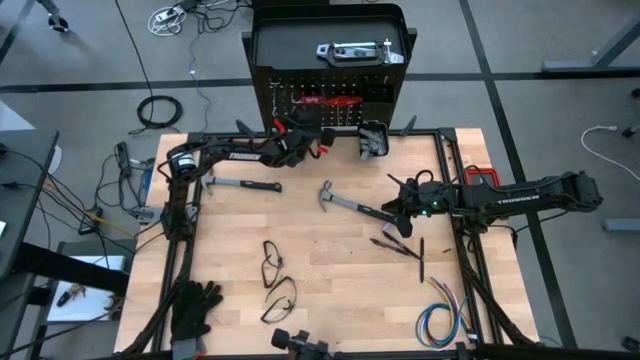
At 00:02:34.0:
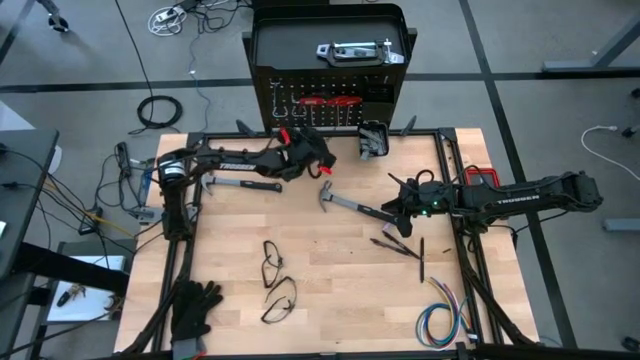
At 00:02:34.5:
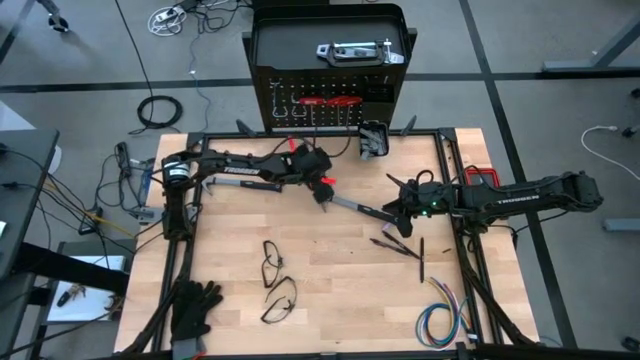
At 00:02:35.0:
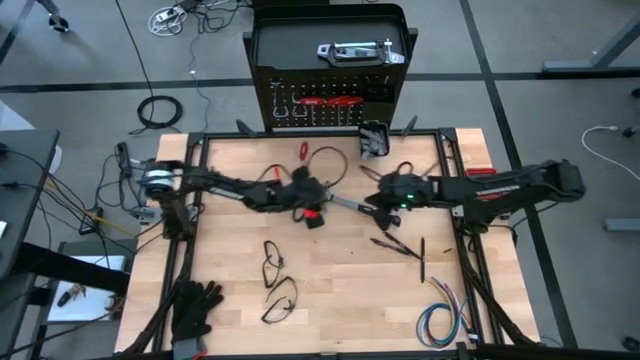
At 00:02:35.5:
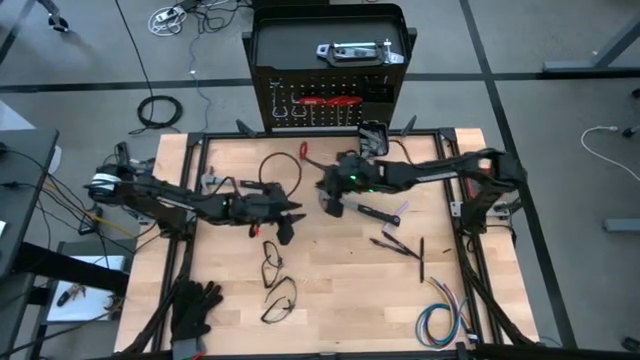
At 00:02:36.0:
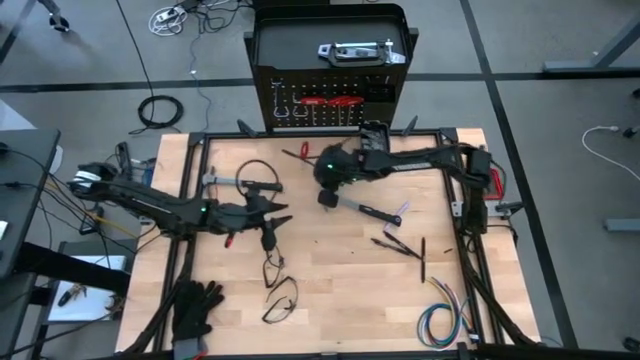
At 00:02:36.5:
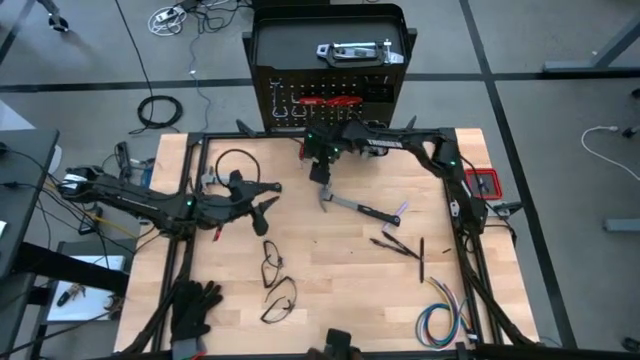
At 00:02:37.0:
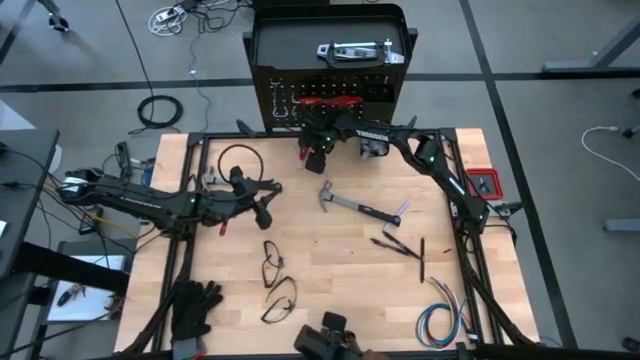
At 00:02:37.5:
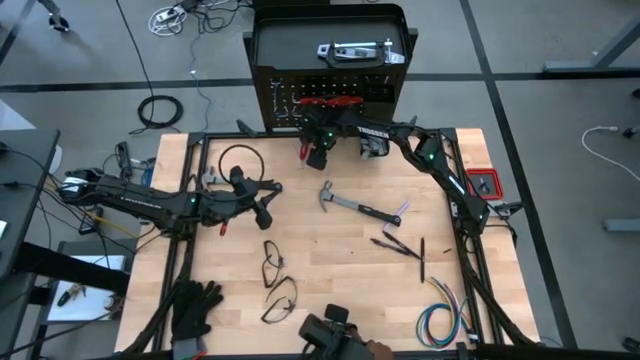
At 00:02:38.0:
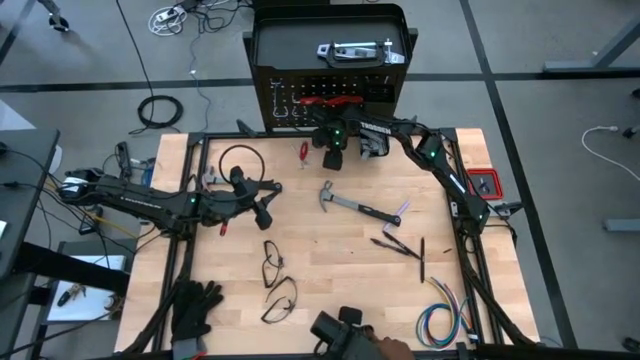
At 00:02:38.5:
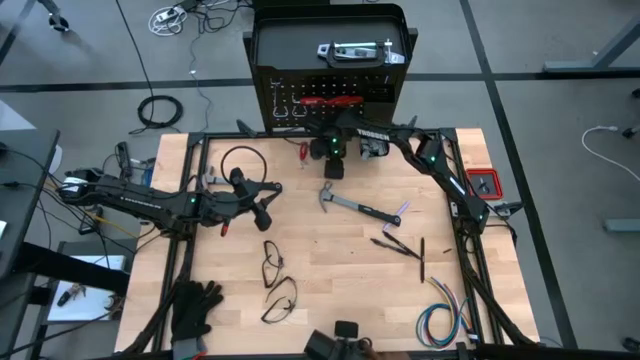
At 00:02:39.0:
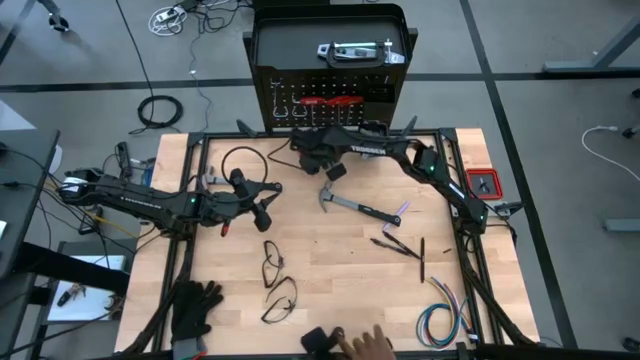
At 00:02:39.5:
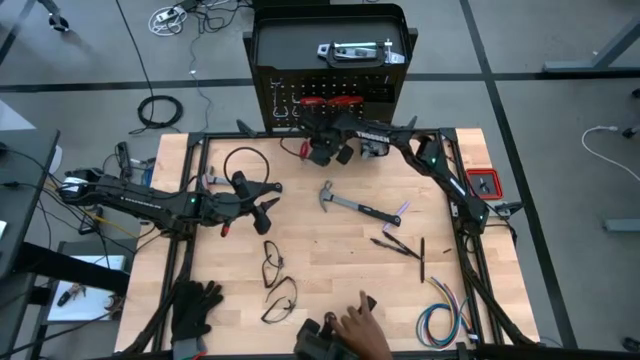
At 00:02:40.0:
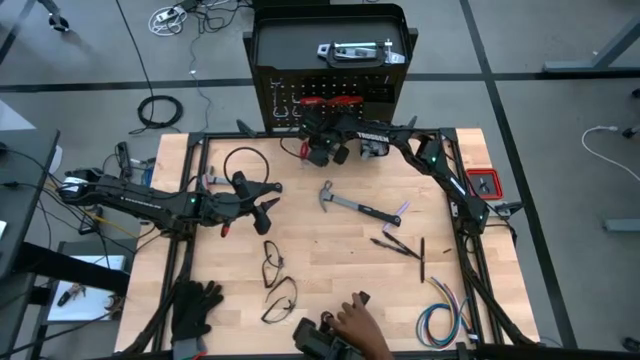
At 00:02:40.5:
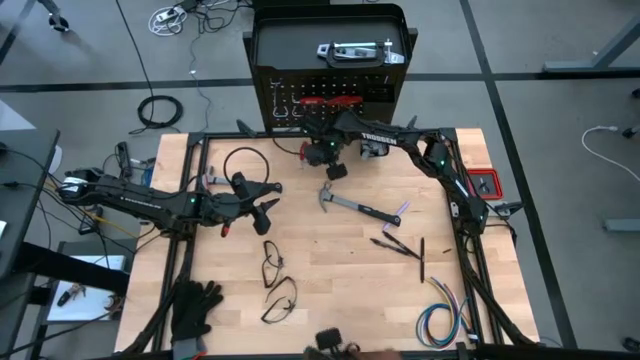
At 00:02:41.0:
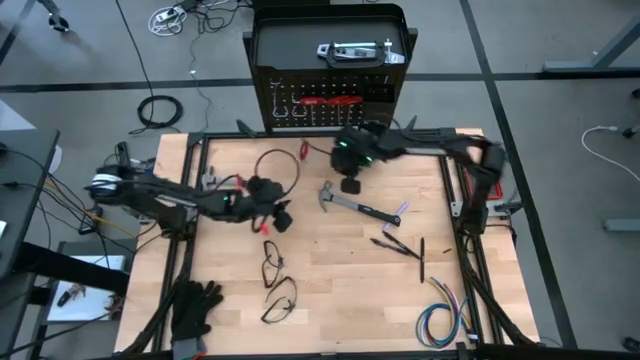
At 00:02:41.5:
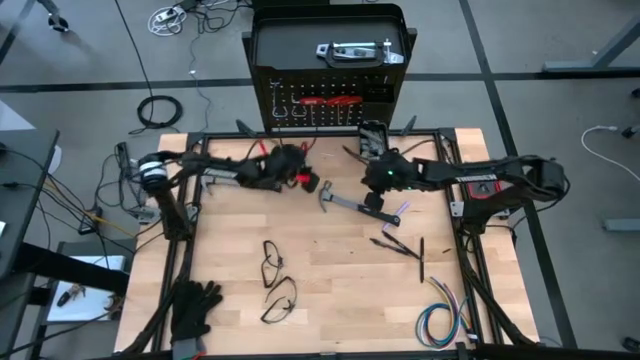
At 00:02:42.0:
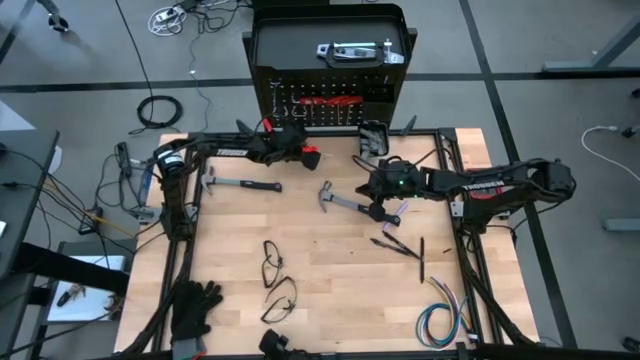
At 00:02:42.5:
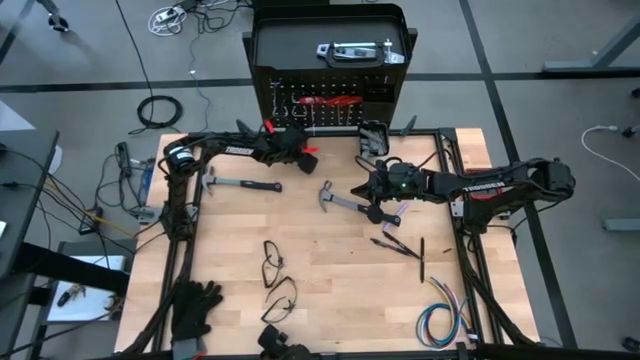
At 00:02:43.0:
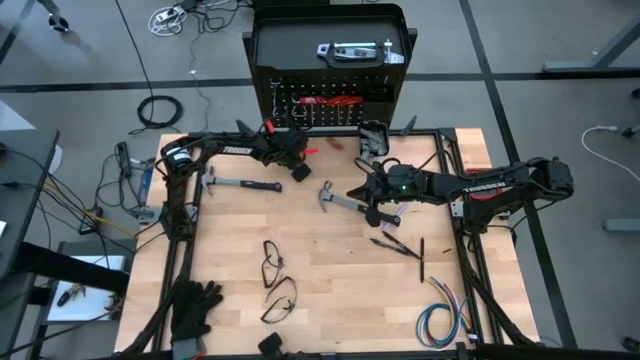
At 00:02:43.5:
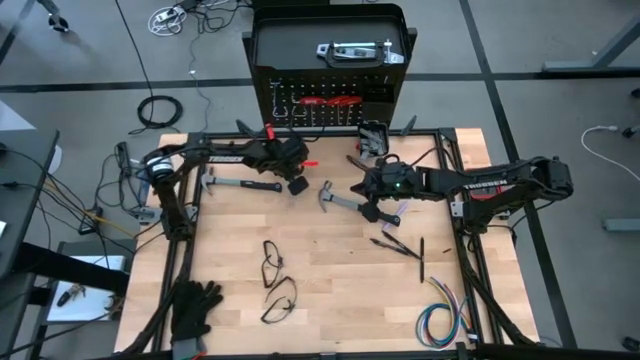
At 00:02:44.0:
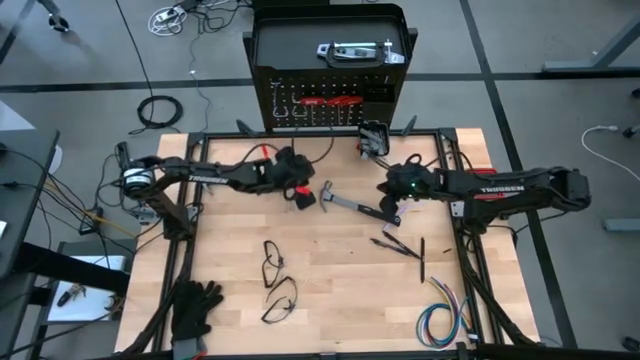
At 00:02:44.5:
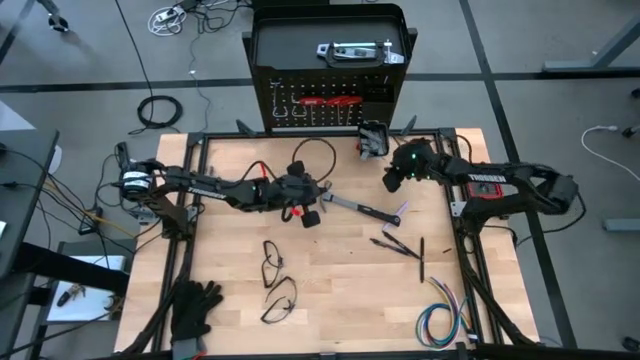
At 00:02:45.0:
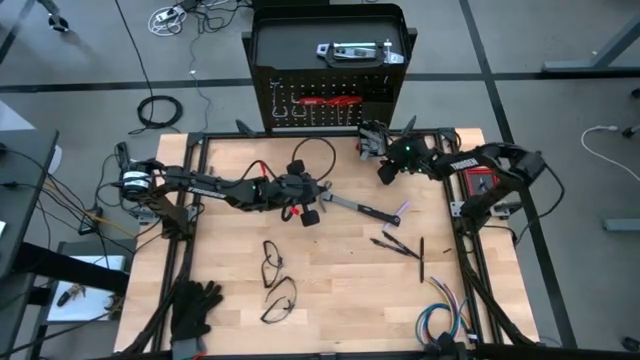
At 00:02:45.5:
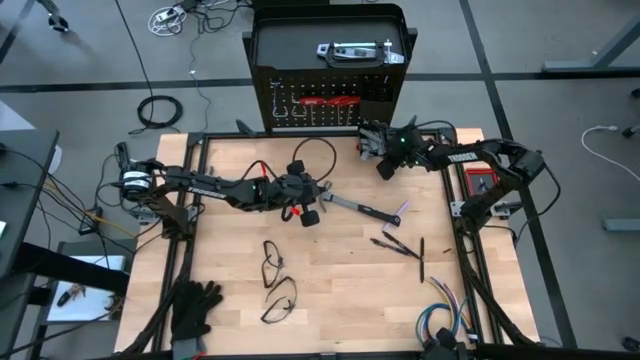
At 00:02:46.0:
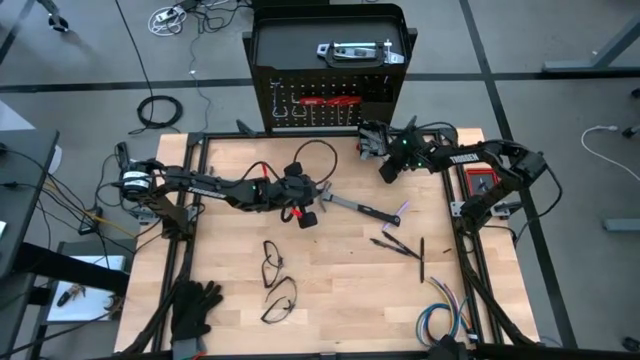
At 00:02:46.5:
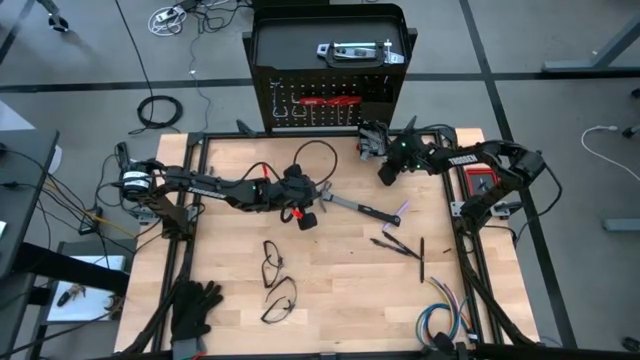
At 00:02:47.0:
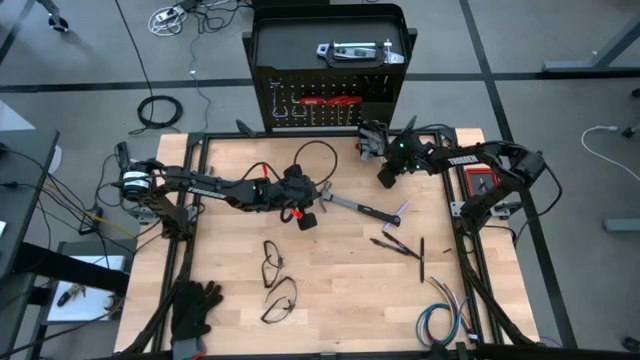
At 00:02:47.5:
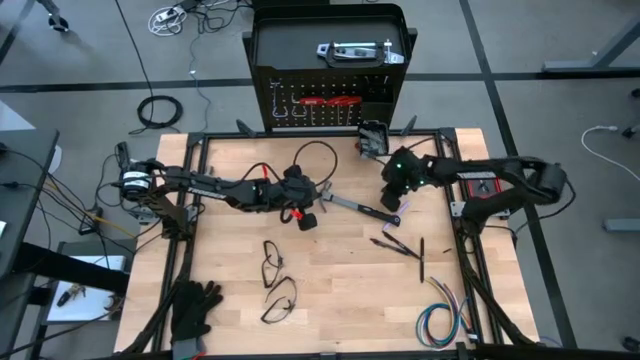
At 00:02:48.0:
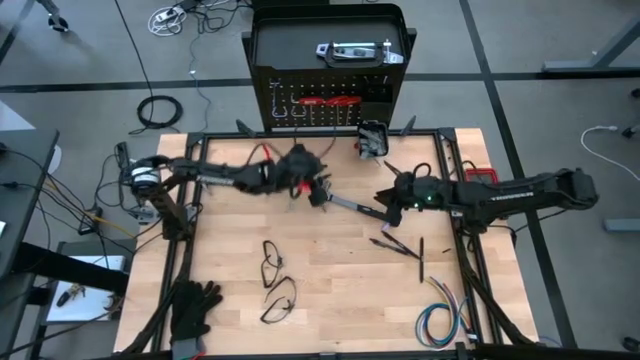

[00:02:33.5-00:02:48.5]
Task: Hang tools onto peg board
Hang the T-shaped metric hex key on the pegboard

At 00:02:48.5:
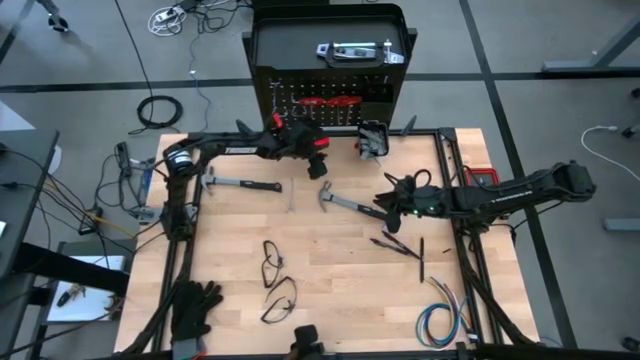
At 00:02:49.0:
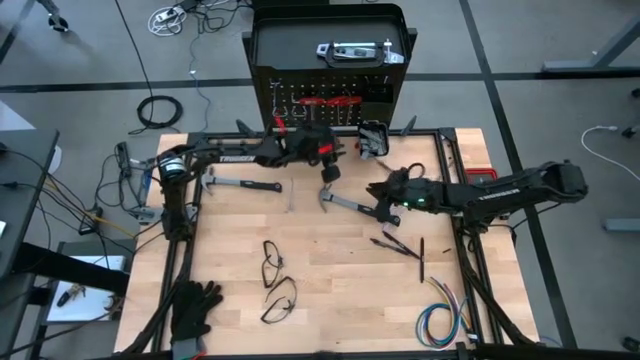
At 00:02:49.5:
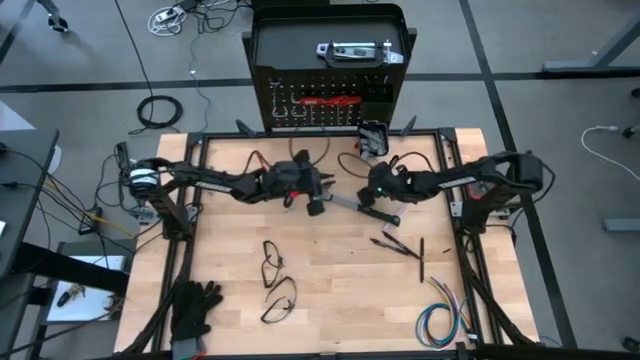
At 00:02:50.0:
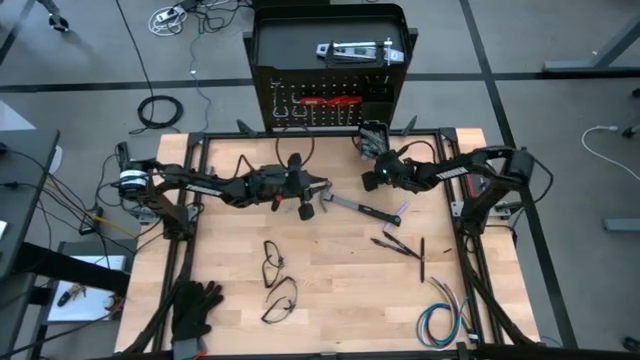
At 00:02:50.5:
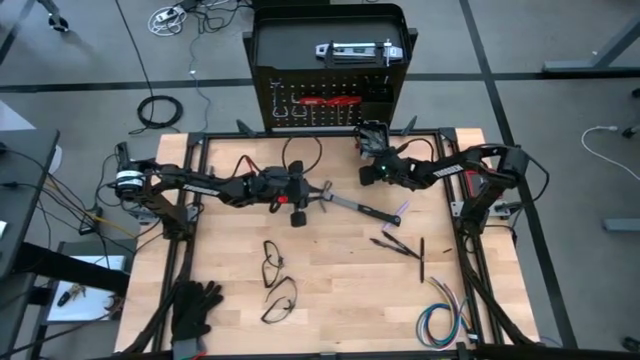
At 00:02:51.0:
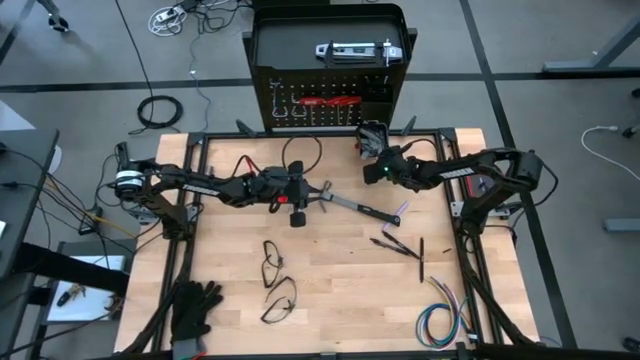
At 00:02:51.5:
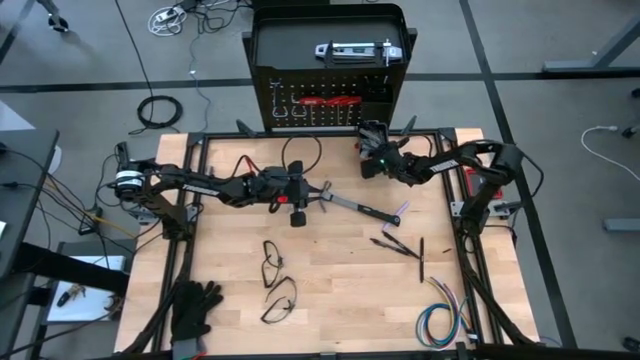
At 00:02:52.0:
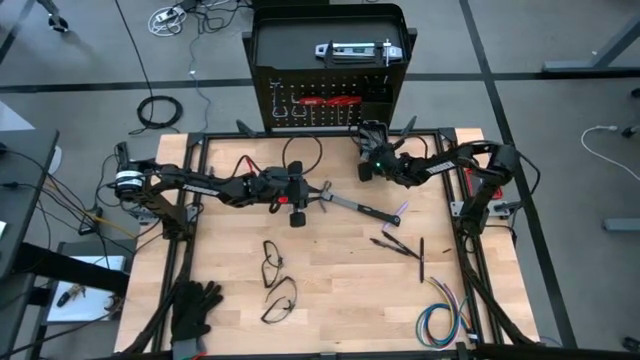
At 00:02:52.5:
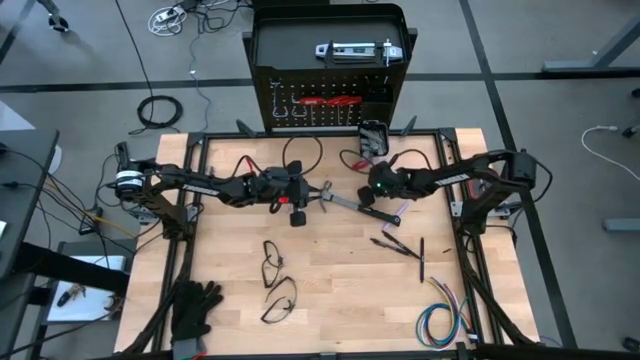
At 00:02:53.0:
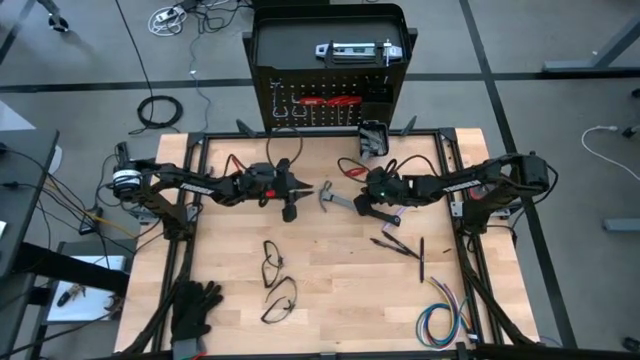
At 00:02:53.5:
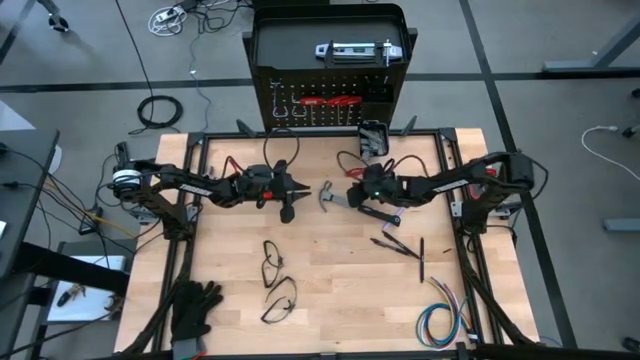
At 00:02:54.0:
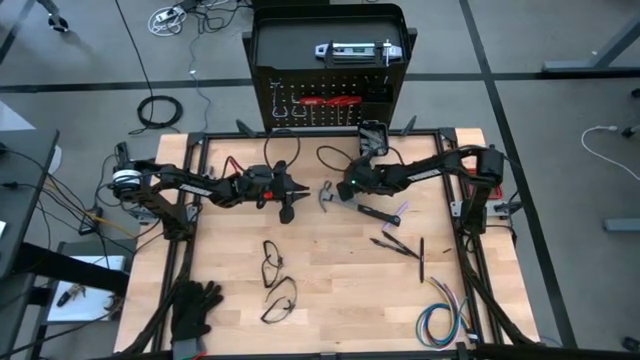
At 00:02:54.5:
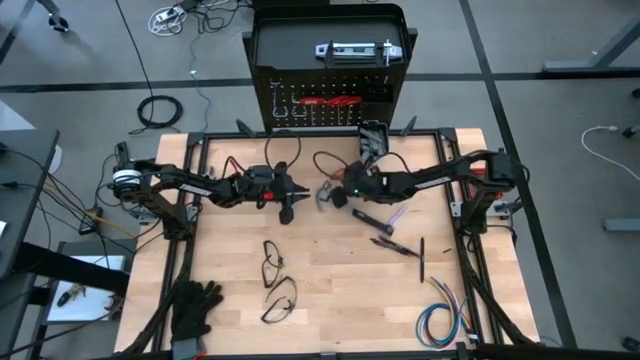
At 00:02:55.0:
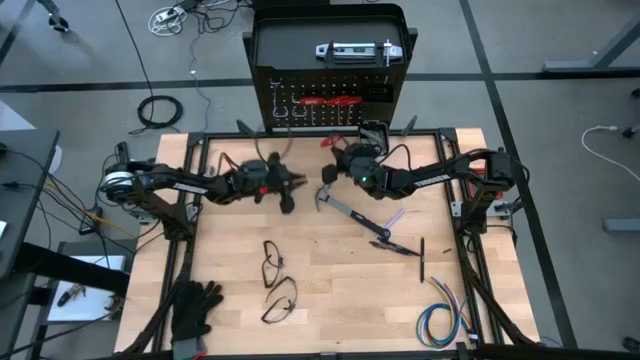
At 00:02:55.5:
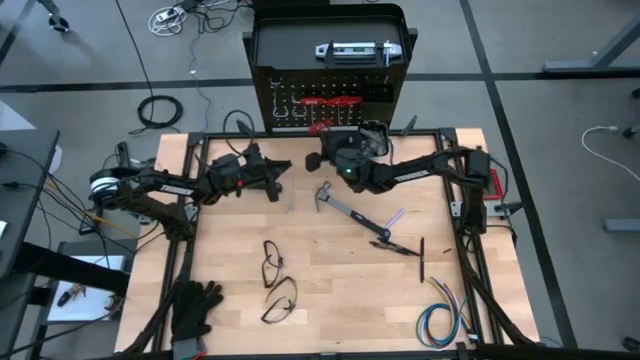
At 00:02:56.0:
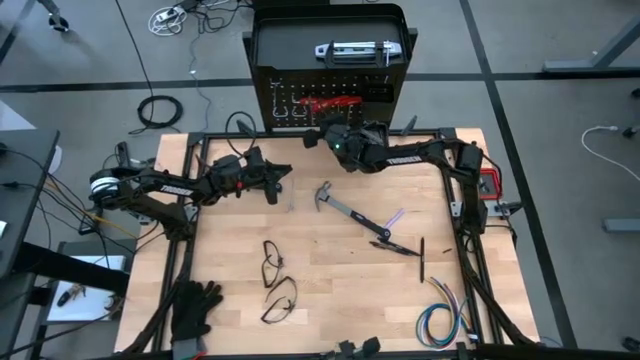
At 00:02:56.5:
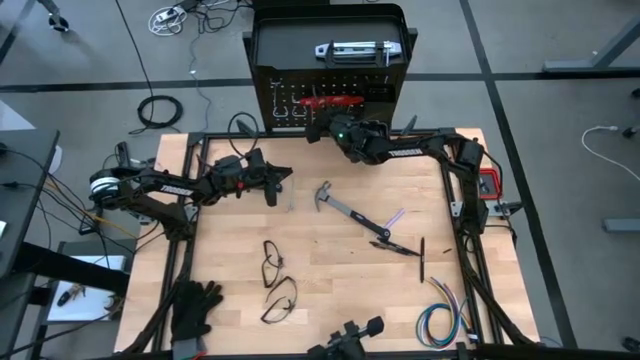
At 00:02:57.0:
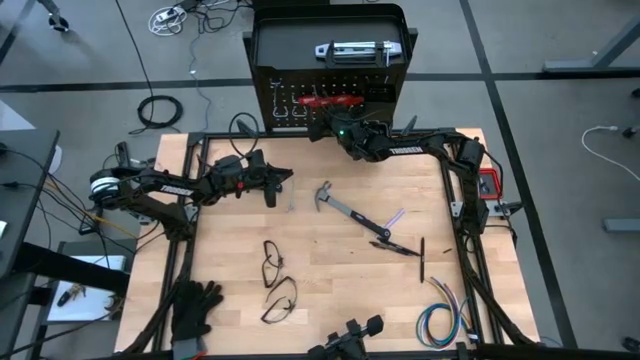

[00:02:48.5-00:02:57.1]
Hang the T-shaped metric hex key on the pegboard
